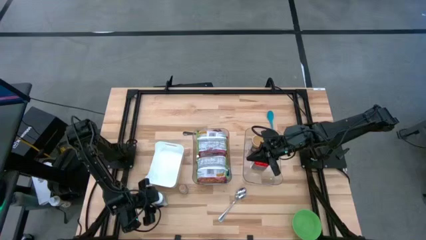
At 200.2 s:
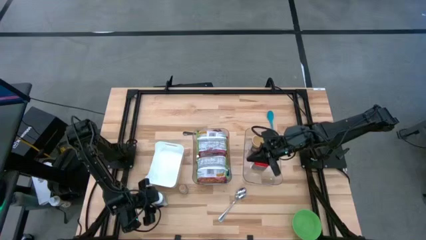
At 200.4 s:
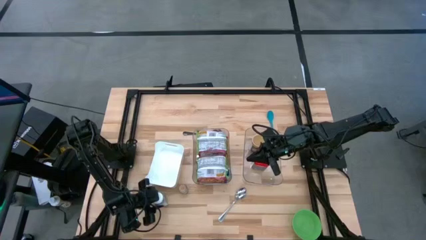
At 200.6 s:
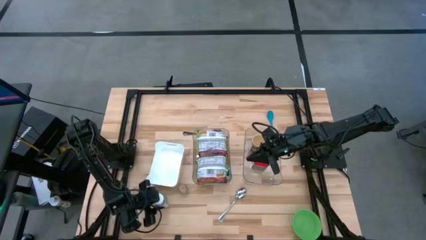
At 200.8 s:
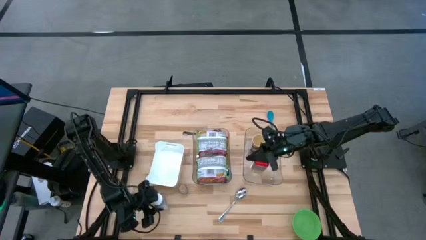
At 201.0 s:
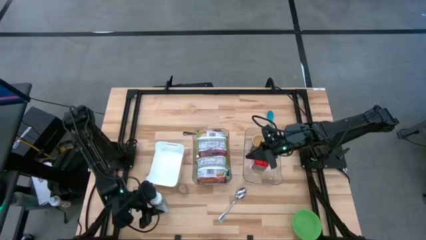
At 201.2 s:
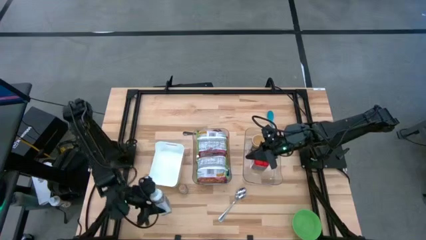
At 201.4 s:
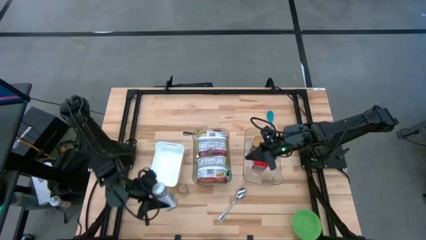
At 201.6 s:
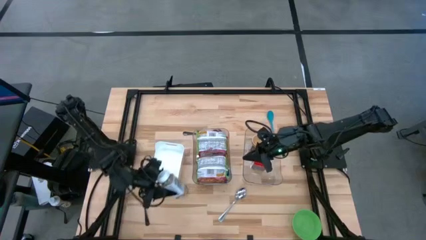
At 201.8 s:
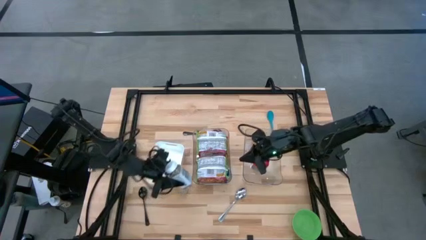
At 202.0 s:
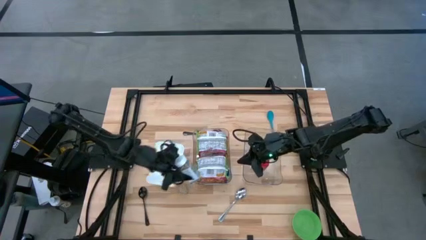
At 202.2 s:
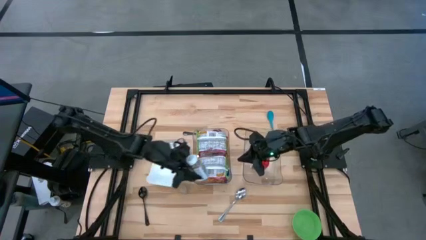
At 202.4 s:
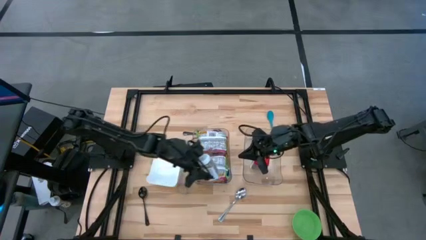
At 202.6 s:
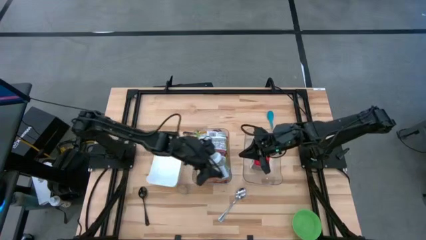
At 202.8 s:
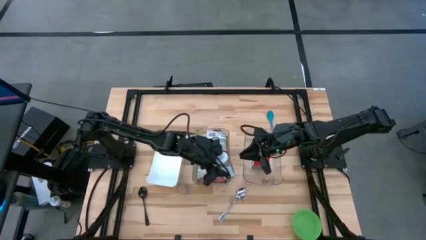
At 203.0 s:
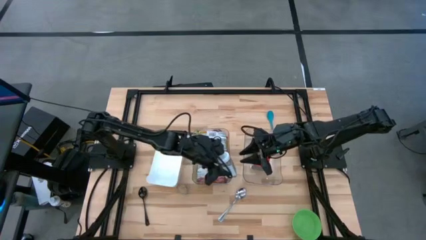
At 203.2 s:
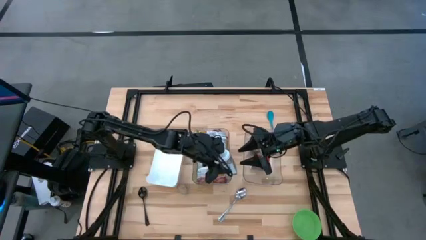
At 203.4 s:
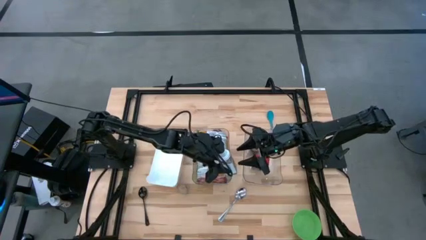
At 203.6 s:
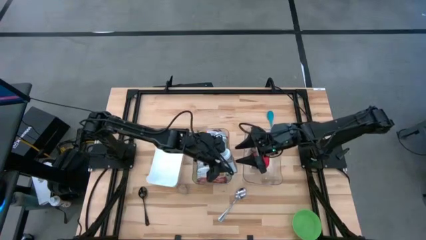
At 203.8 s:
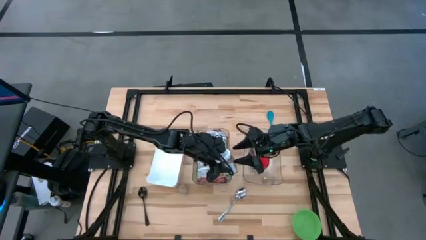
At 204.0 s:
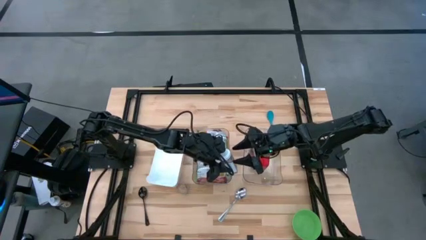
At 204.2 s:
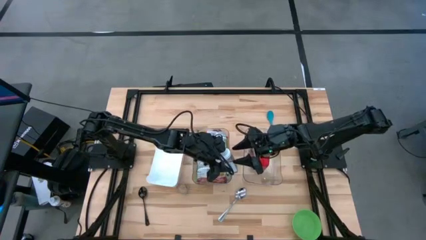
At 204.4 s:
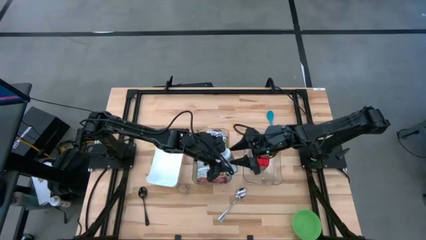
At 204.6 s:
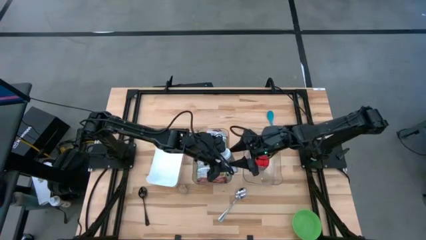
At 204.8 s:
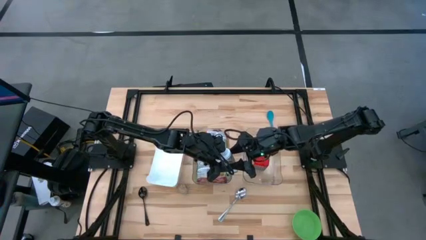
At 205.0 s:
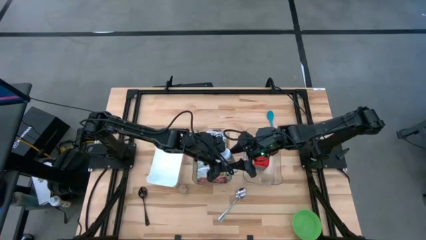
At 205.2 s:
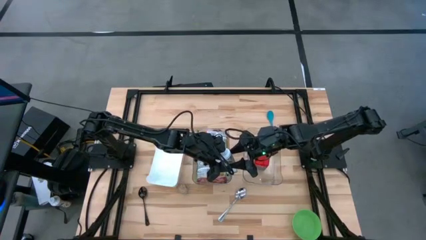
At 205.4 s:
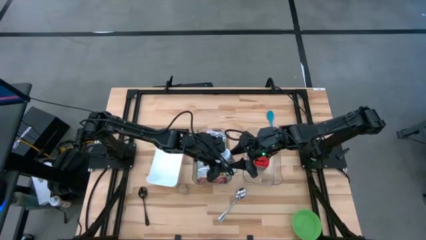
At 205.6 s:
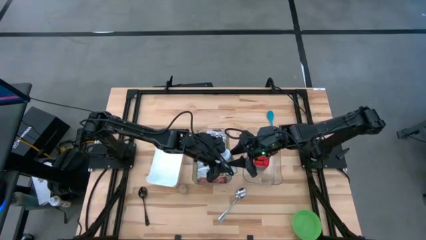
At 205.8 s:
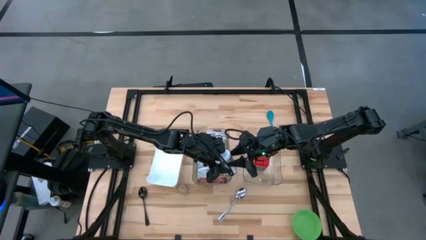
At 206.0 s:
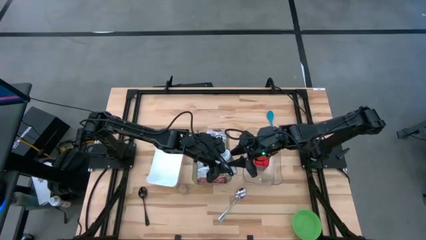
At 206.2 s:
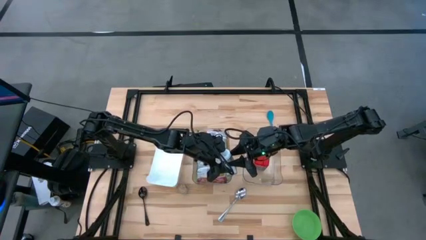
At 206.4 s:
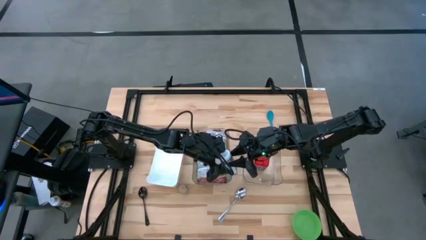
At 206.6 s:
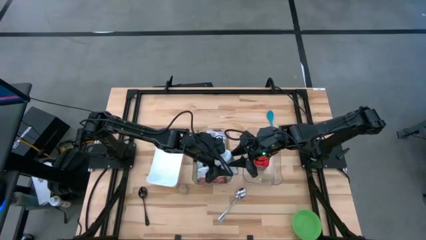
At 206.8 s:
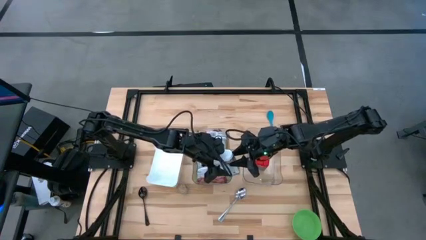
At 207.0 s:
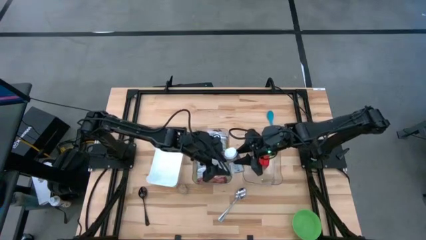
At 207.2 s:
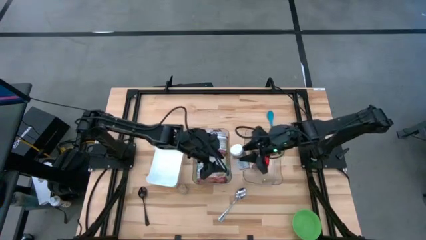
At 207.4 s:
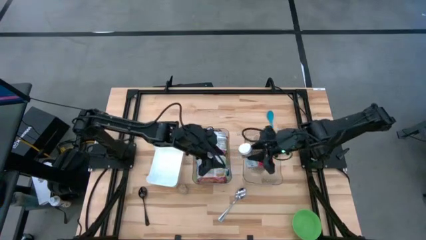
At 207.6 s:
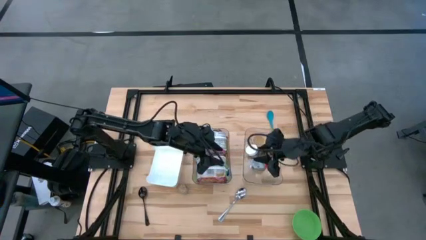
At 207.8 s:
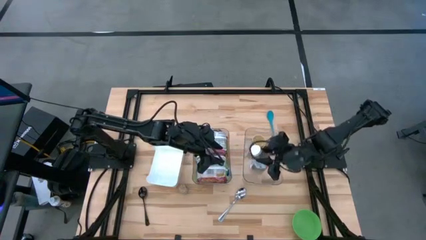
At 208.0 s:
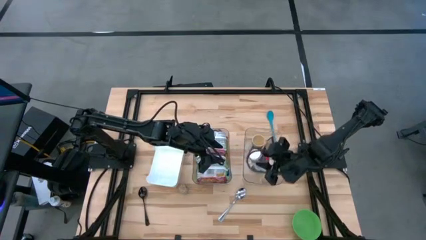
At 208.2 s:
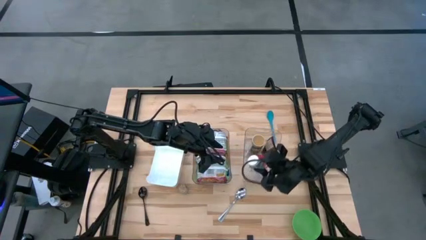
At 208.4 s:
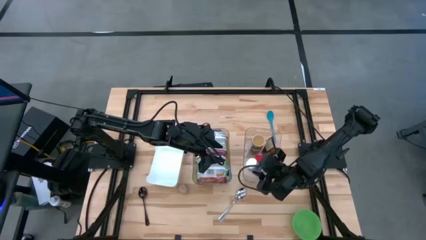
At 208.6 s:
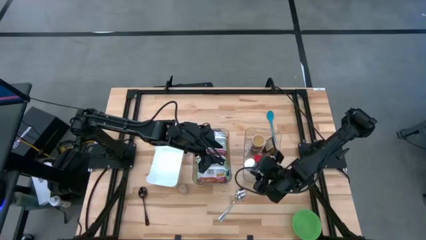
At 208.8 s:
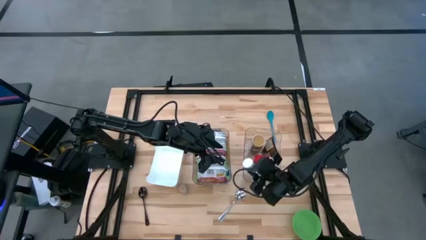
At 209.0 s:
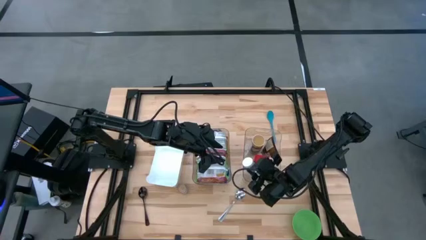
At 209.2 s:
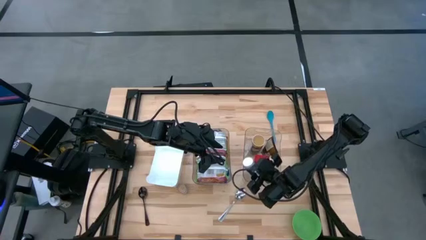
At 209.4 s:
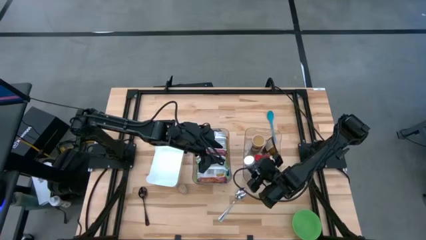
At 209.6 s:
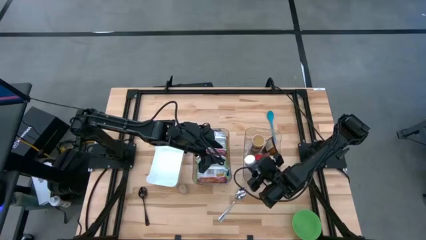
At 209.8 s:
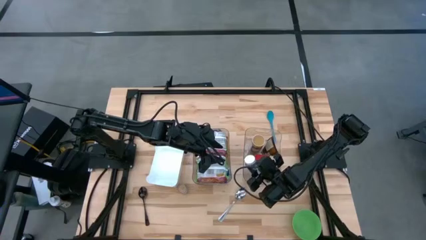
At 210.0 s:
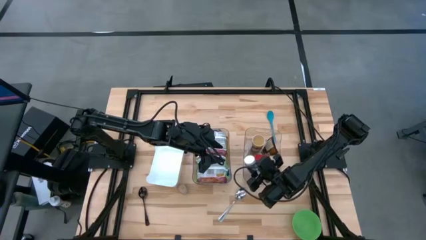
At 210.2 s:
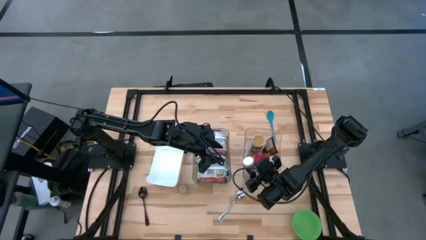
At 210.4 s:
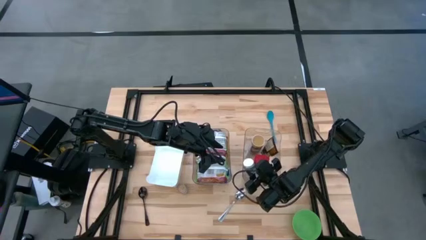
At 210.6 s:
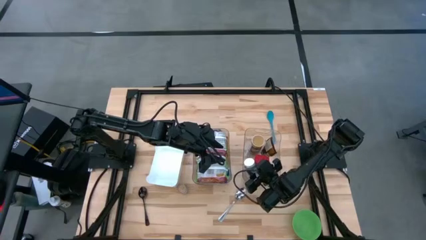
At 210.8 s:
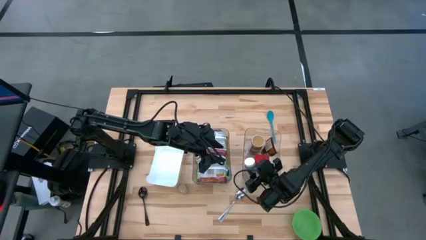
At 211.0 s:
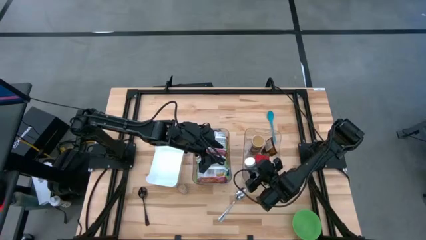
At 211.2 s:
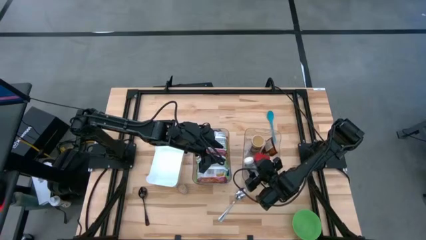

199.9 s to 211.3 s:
Task: Pick & Place Food Item
Put the white spice bottle into the right transparent bin
